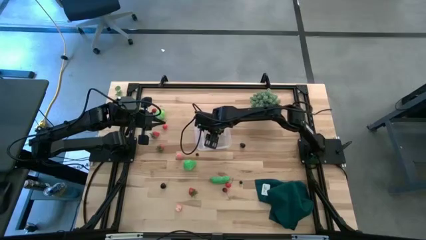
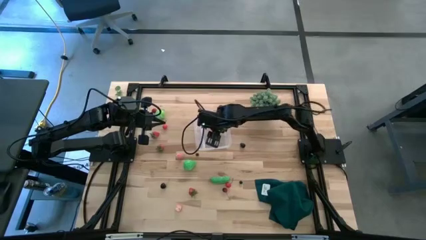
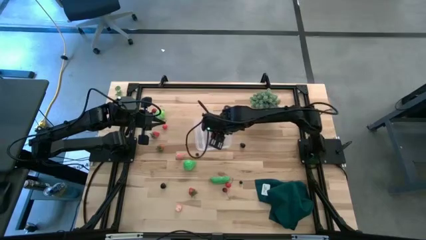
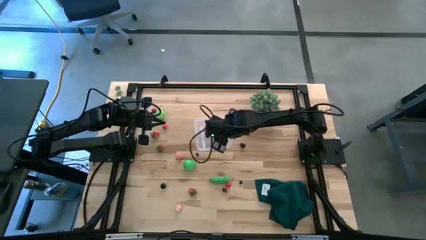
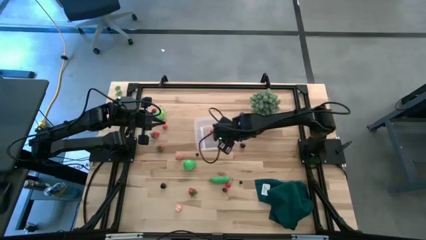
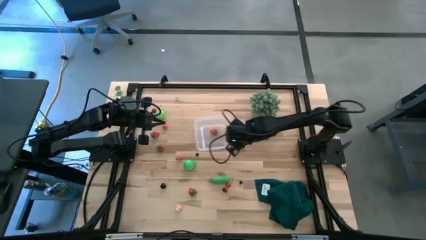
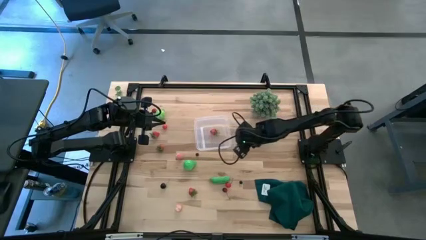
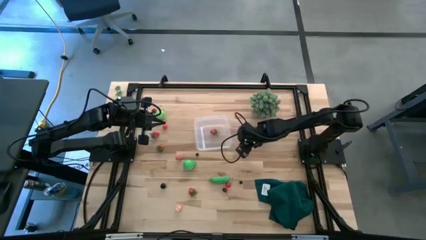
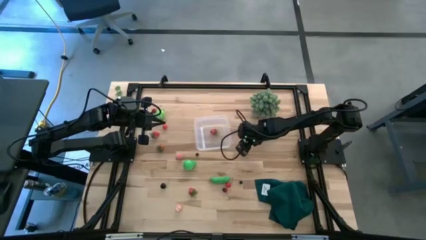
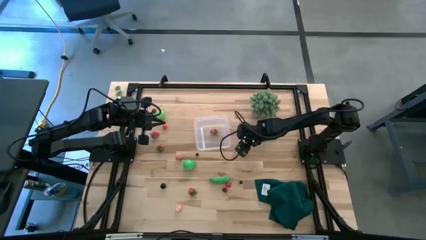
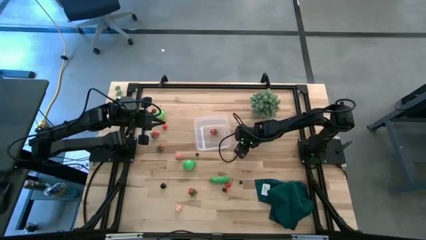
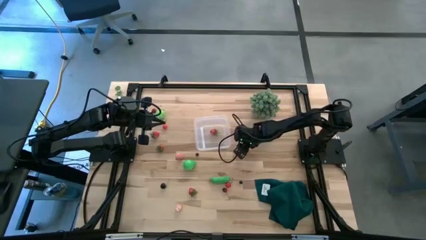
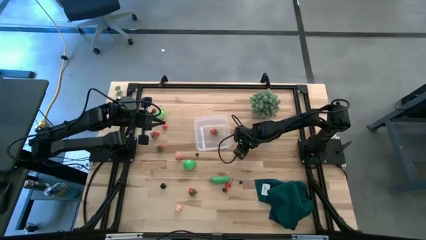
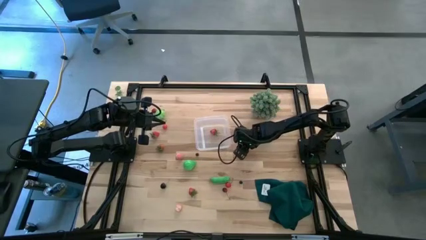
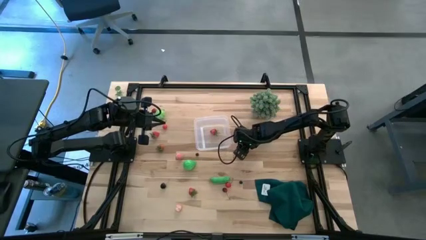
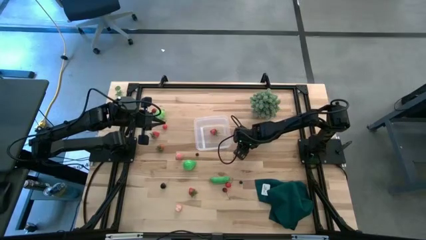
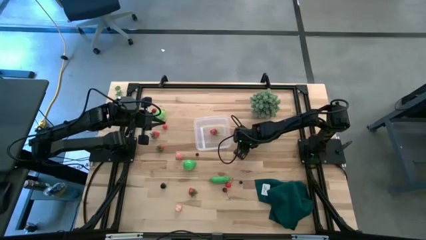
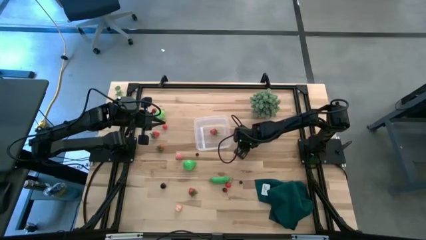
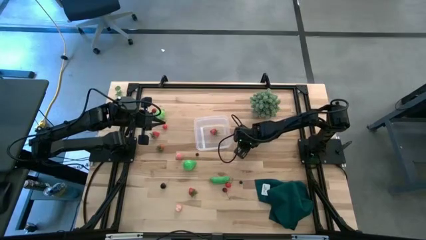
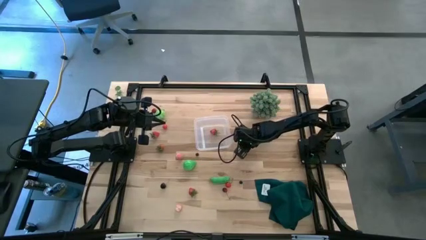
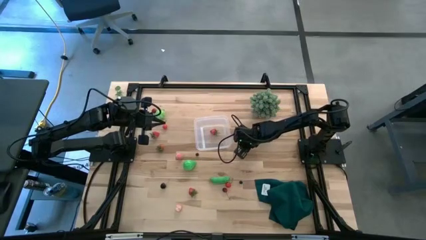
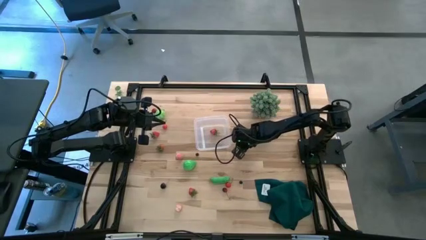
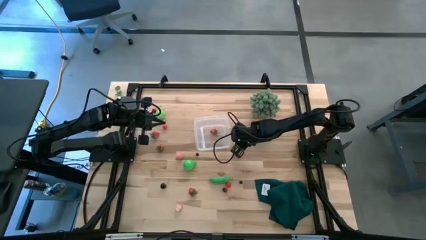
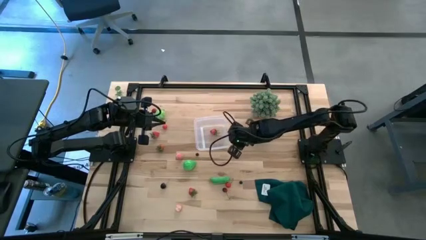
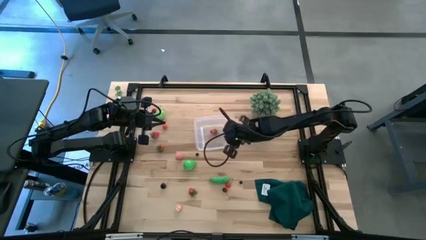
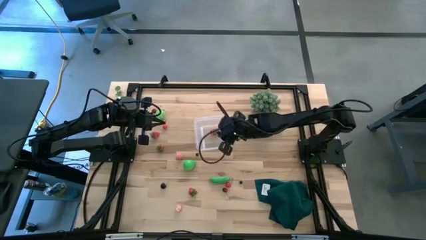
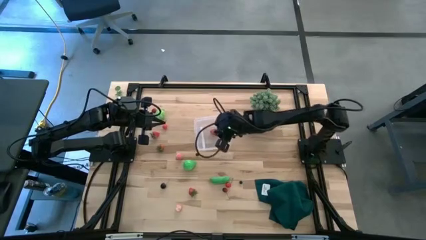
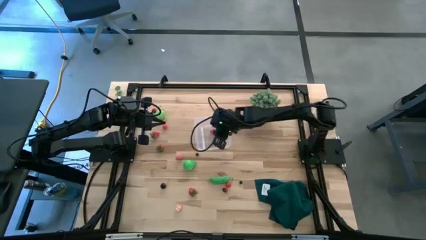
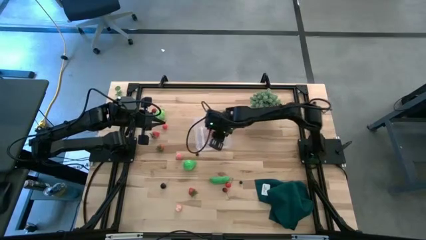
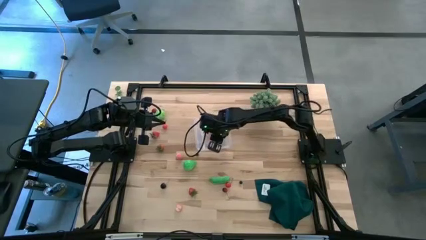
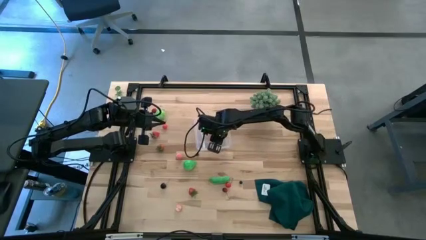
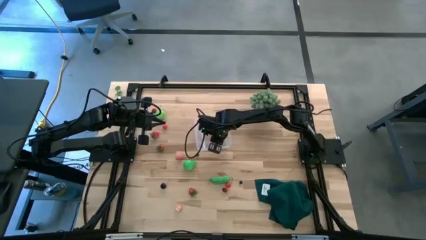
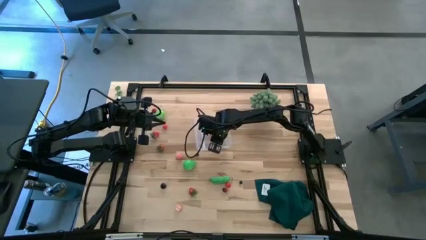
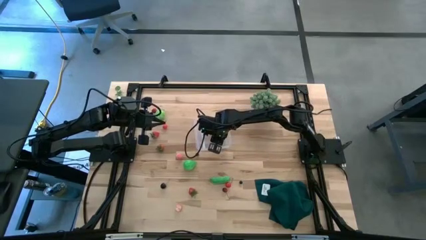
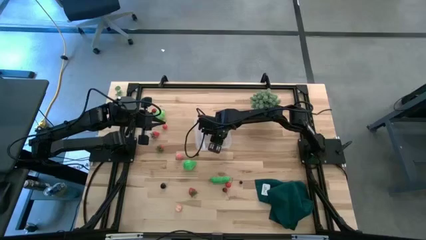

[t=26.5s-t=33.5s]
Task: Pick and placing Produce into tupperware
Put the blackberry into the transparent bin

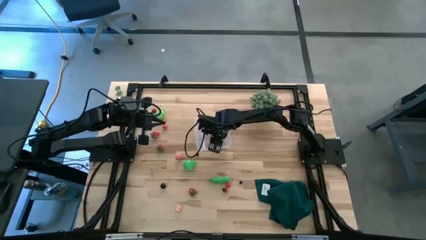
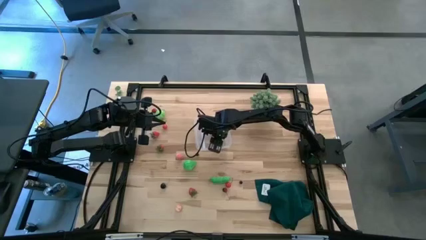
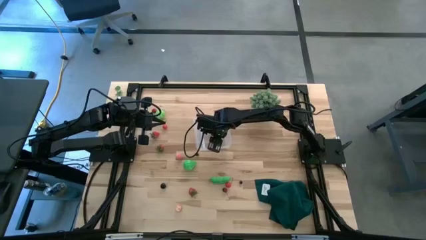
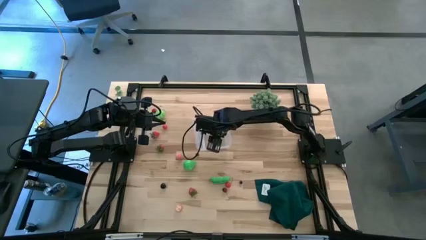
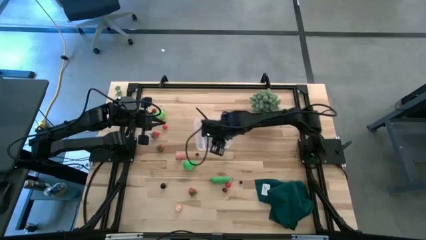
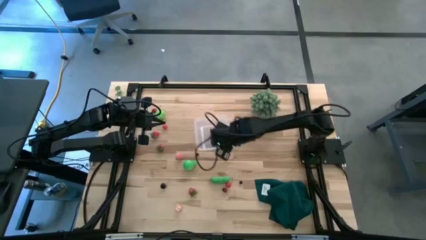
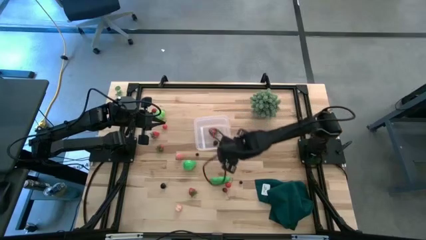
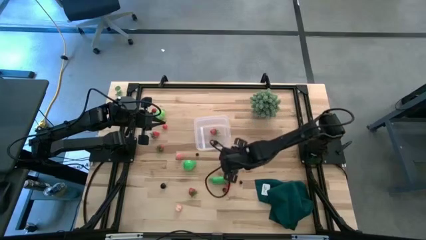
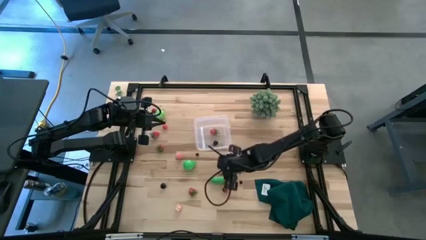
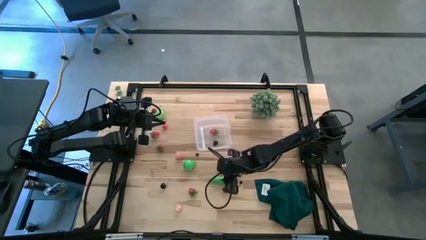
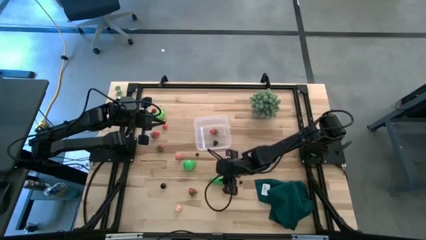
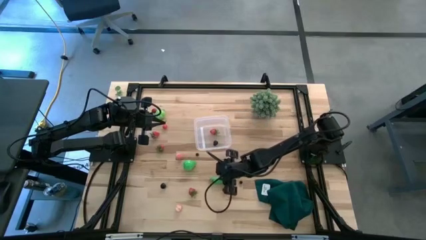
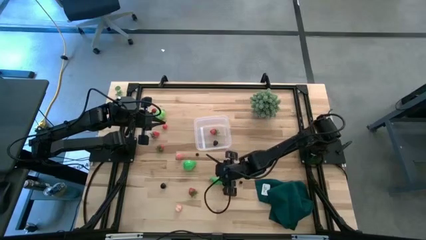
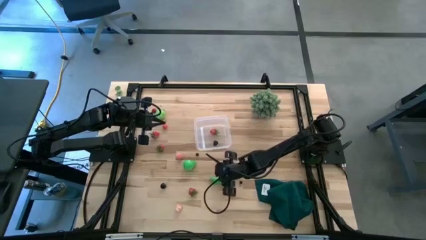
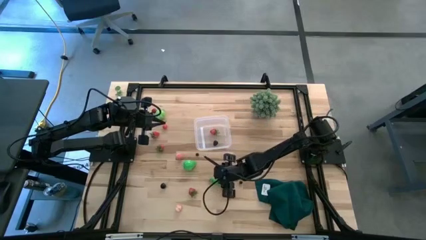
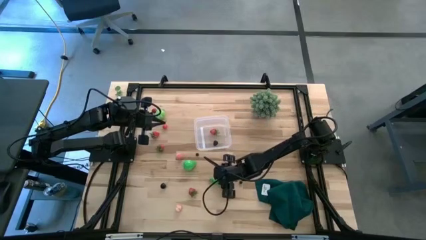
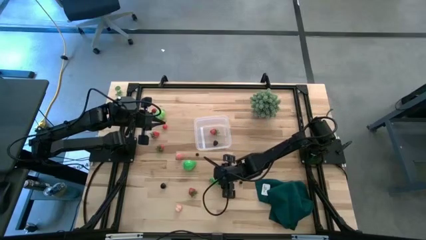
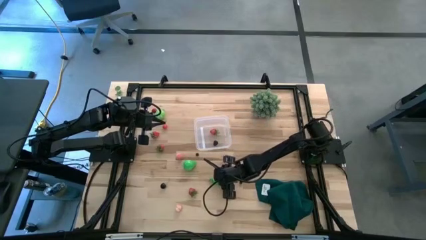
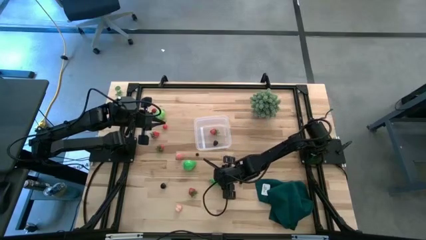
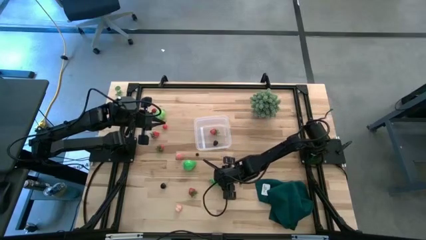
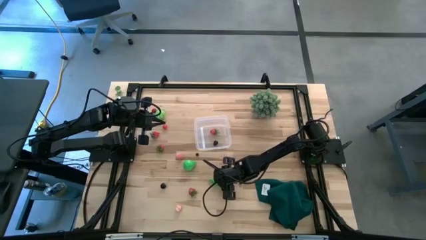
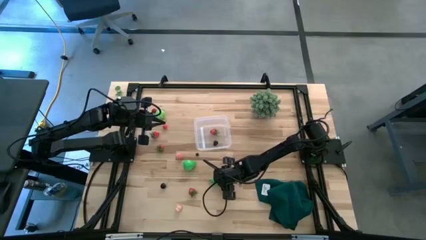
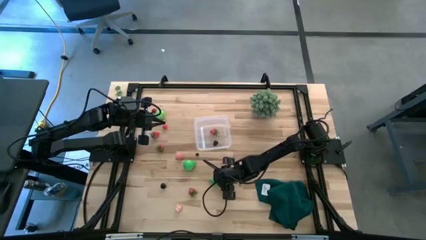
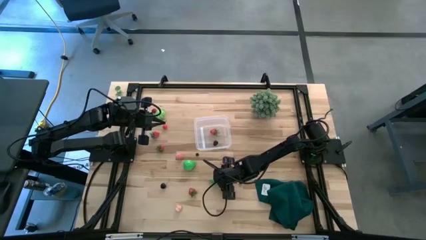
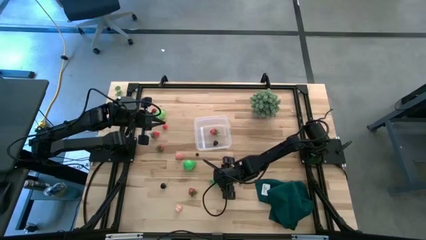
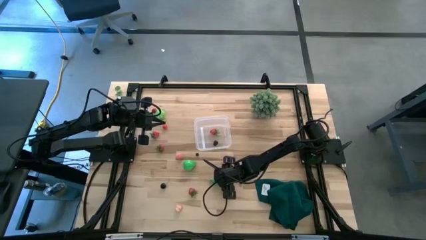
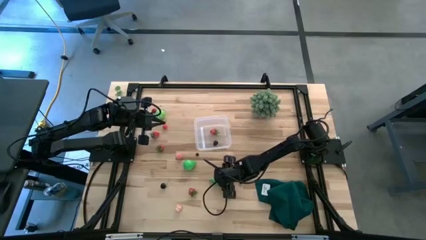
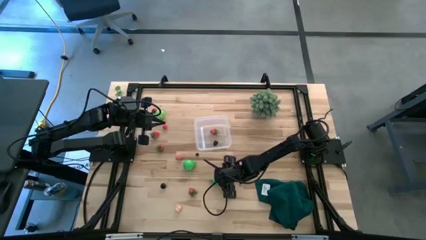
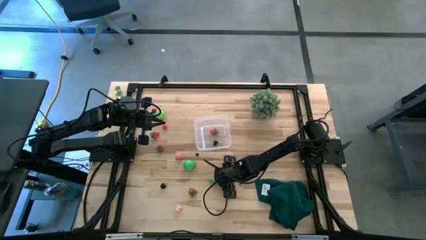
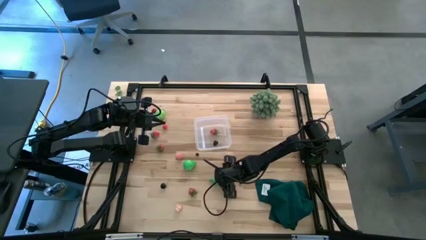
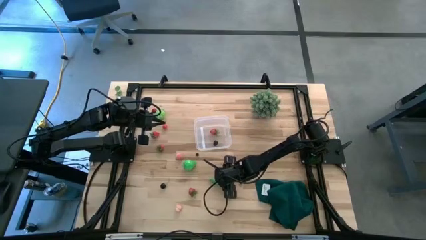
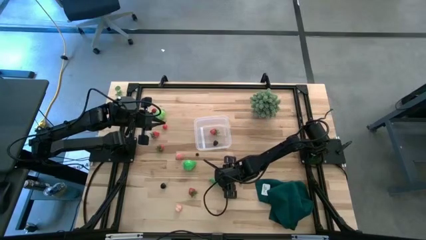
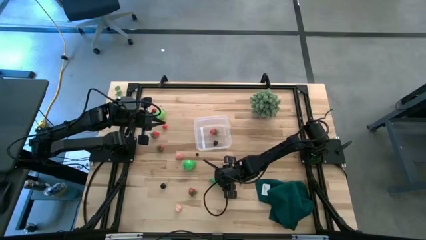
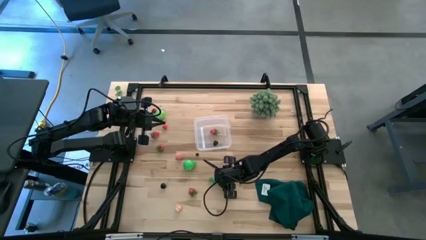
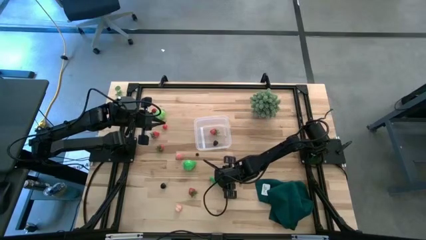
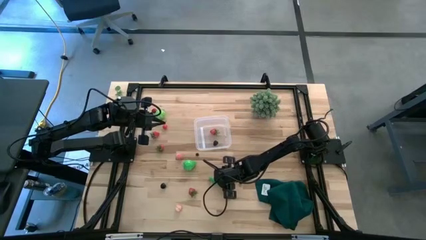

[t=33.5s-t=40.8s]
Put the green pea pod into the transparent bin

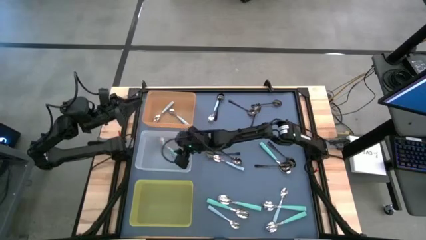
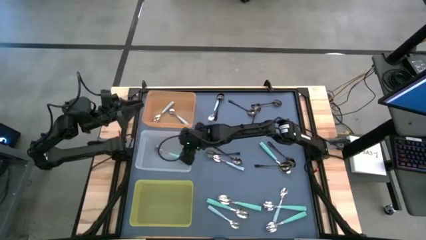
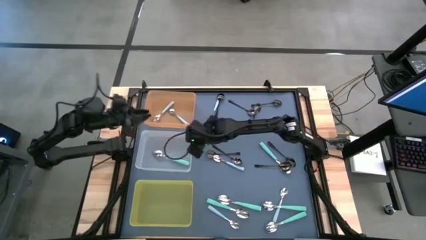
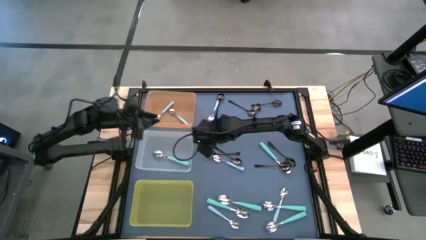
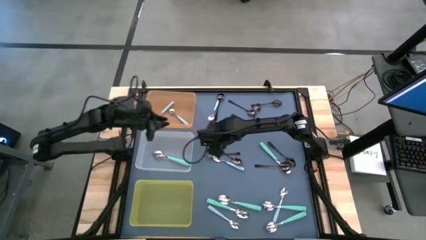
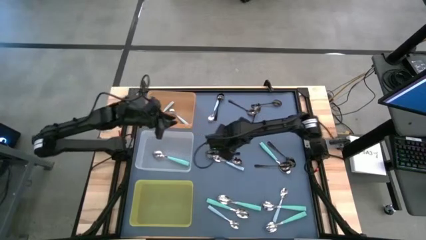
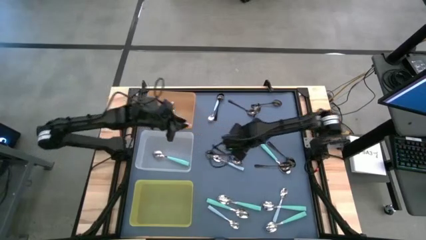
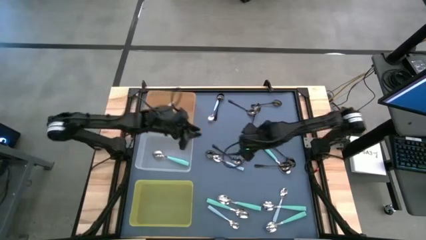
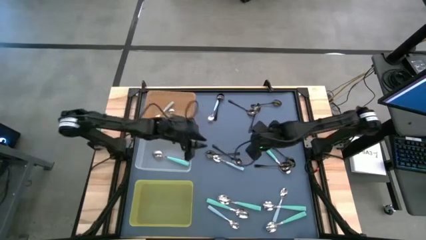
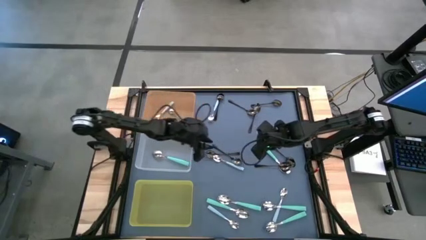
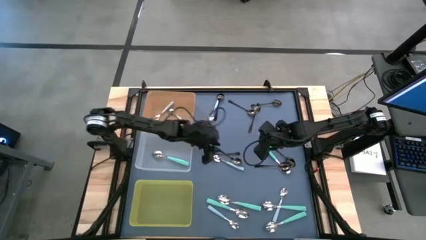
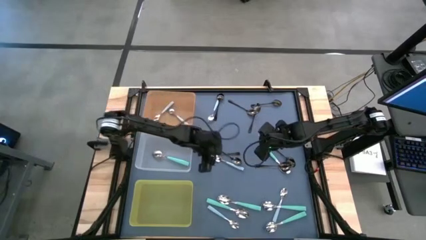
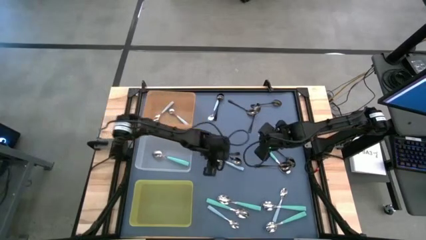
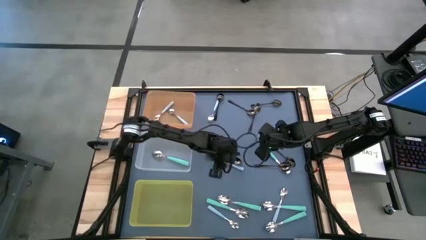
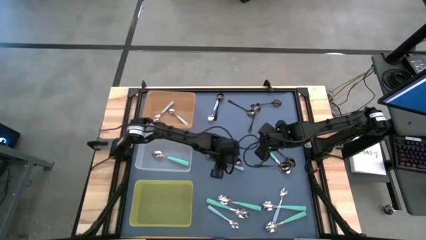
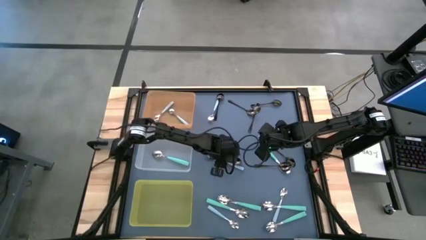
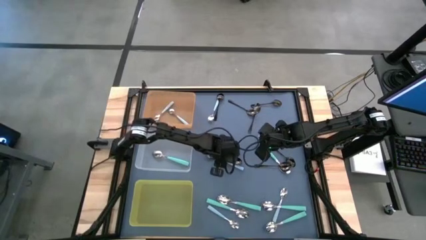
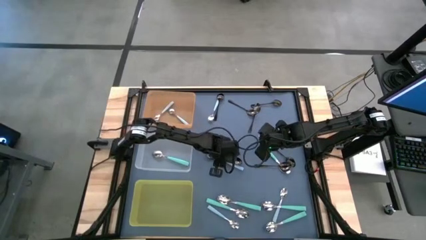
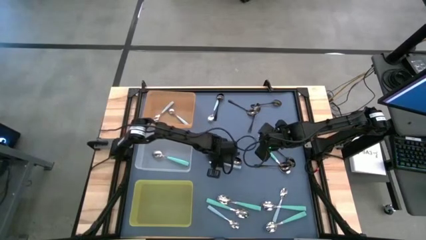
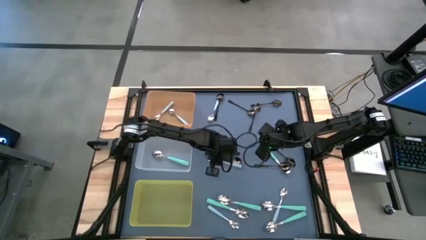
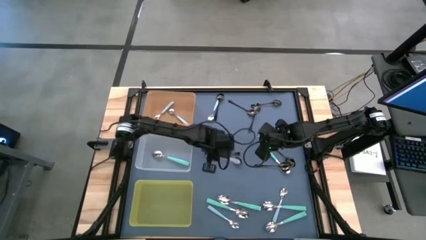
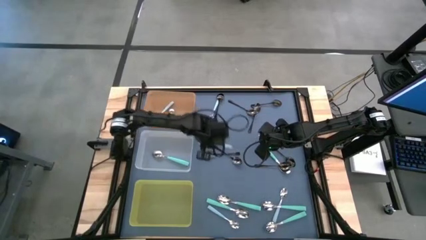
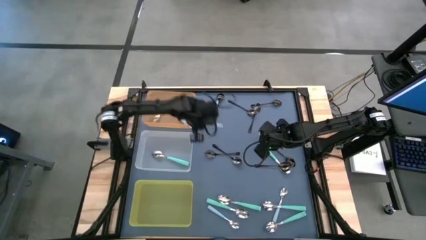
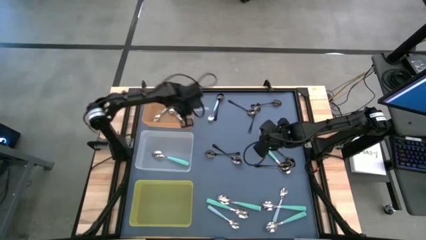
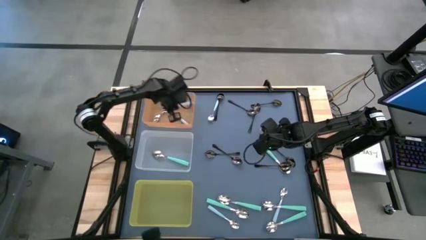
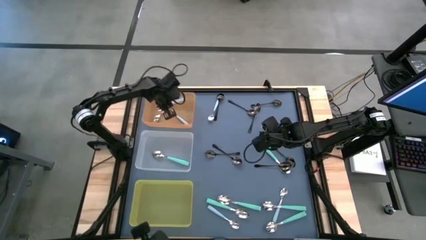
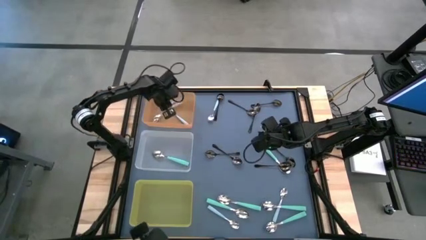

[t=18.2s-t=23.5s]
Task: Sort silverware by color (type)
Put the light blue spoon into the orange bin
